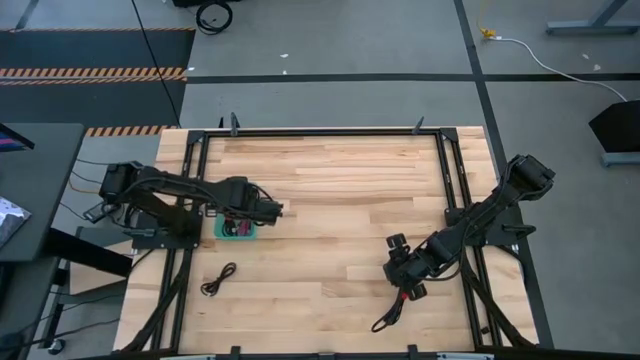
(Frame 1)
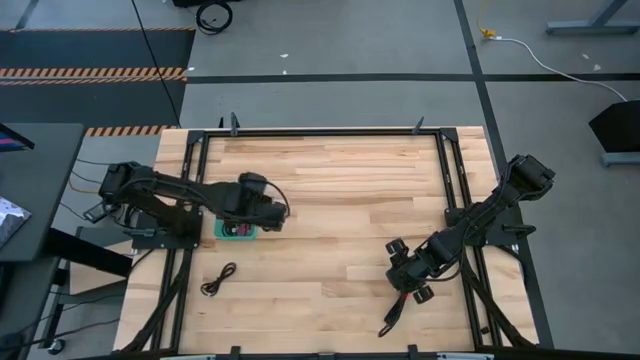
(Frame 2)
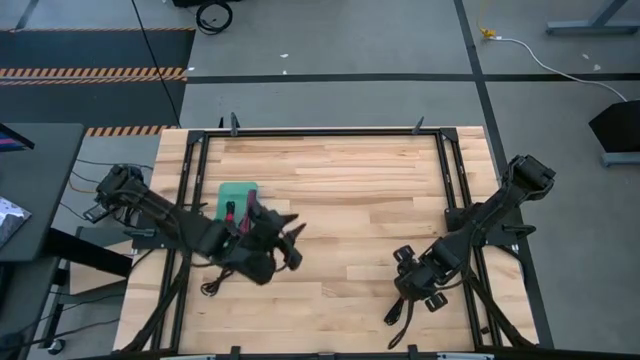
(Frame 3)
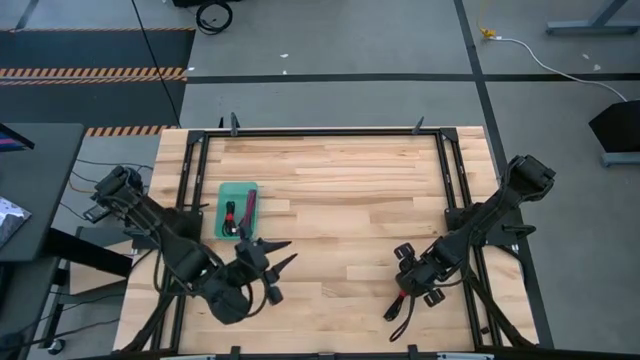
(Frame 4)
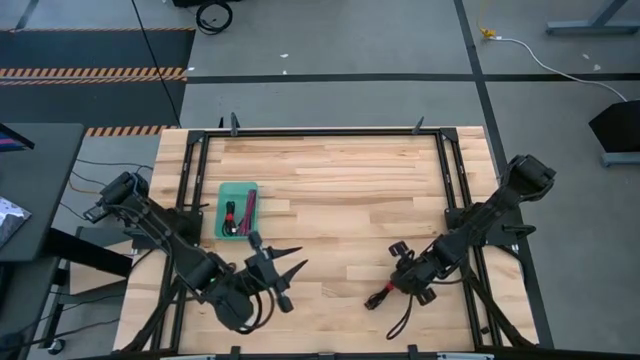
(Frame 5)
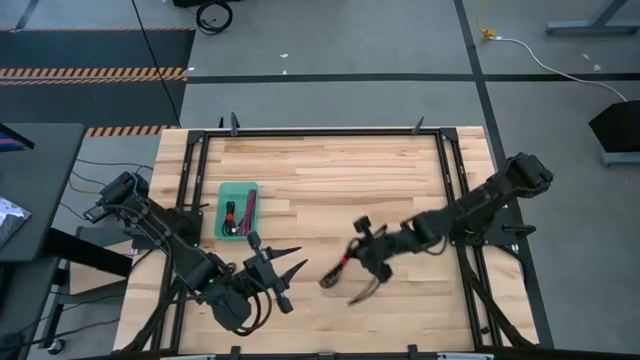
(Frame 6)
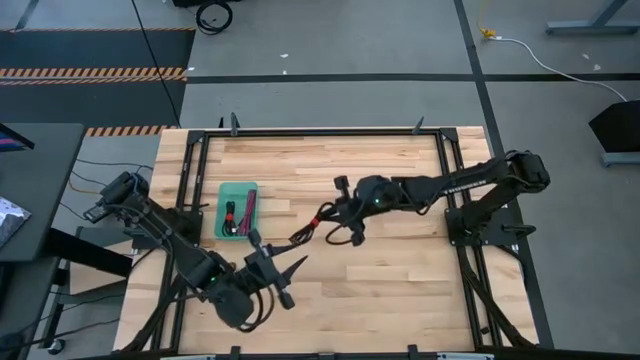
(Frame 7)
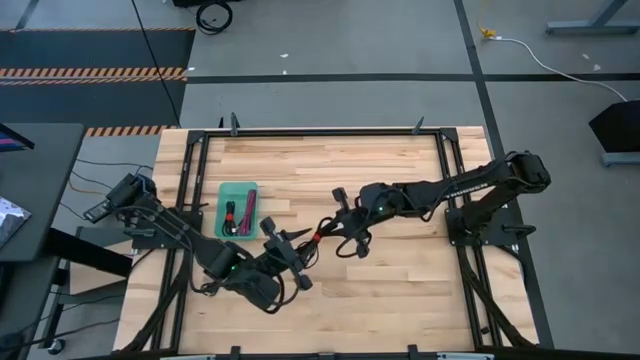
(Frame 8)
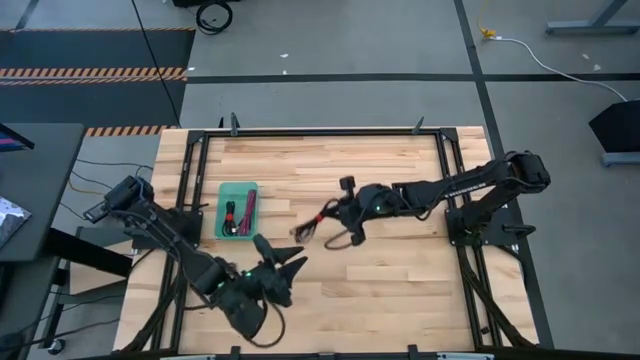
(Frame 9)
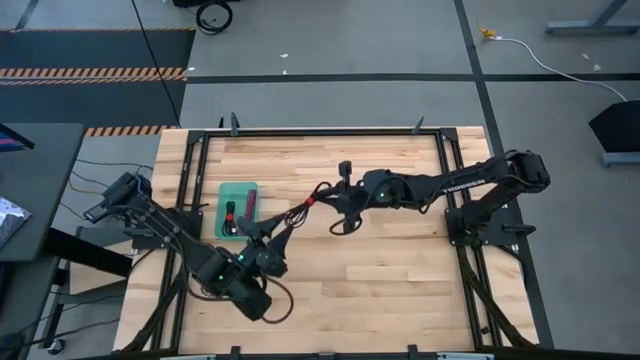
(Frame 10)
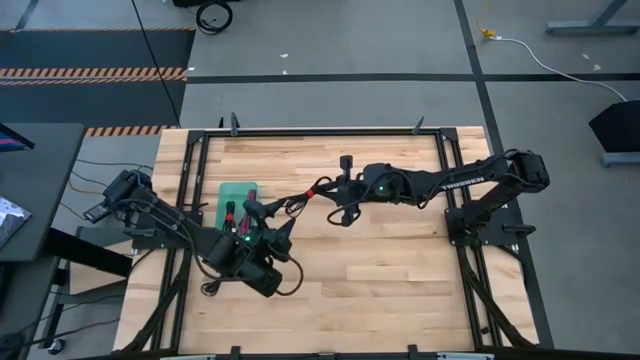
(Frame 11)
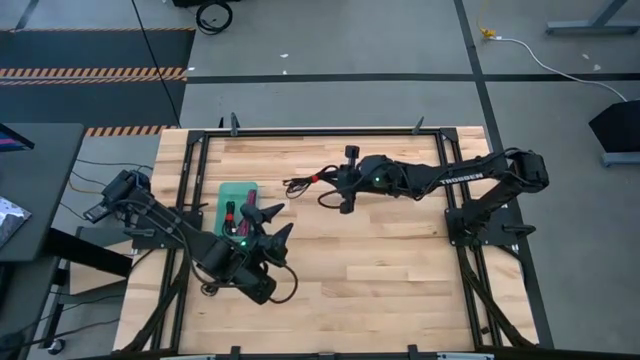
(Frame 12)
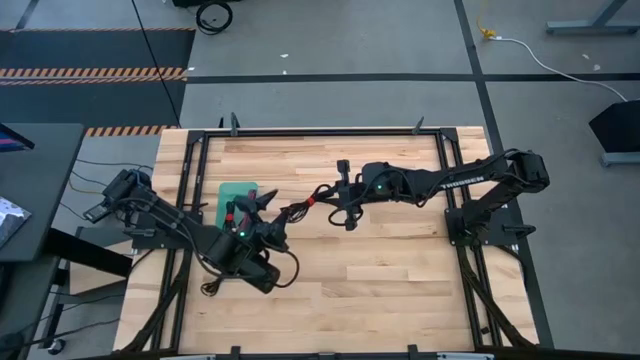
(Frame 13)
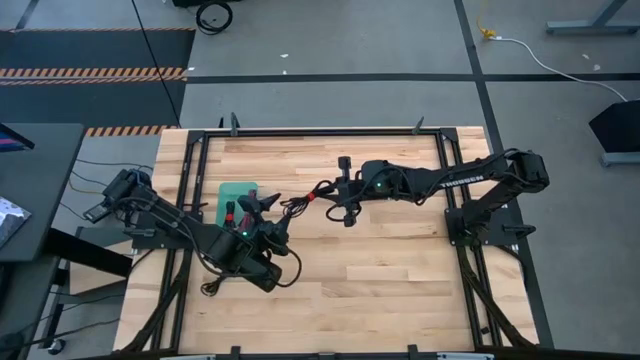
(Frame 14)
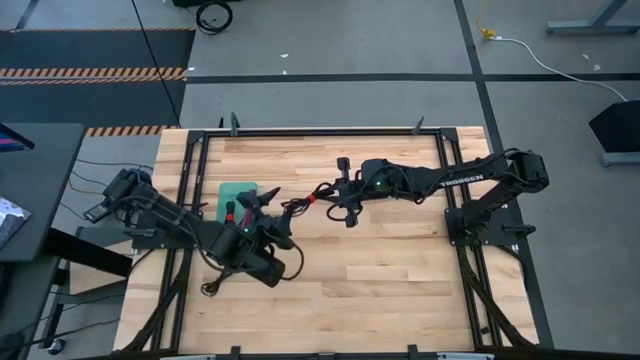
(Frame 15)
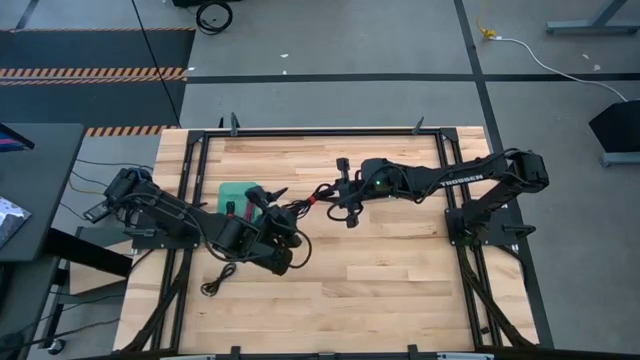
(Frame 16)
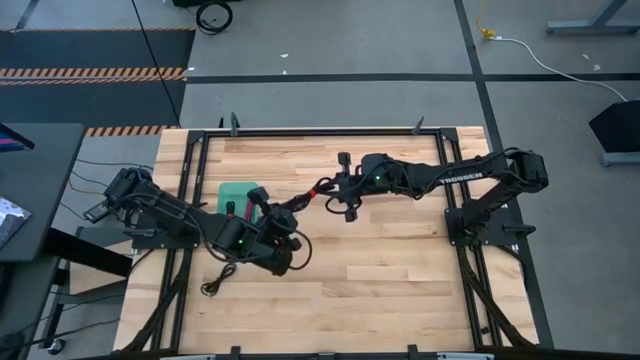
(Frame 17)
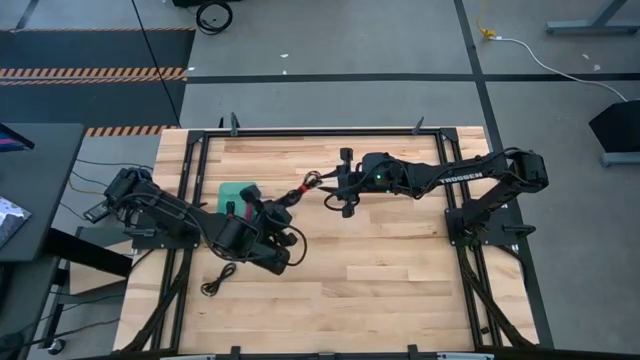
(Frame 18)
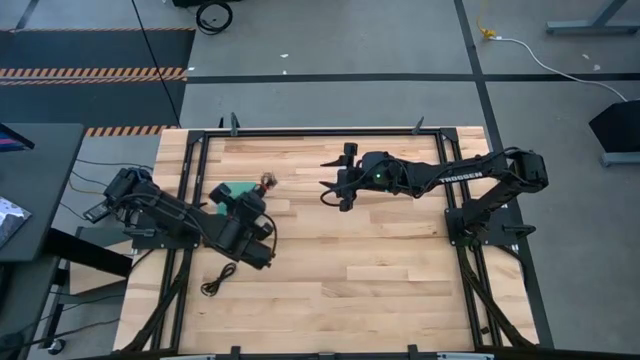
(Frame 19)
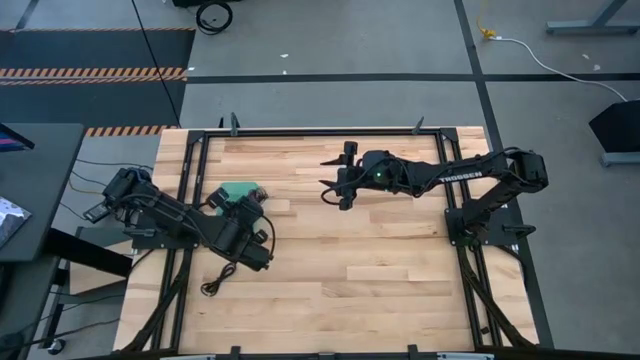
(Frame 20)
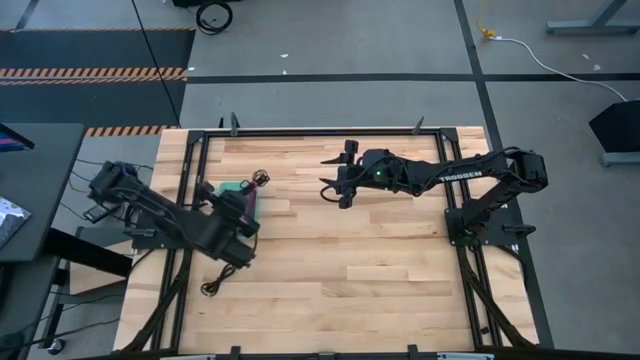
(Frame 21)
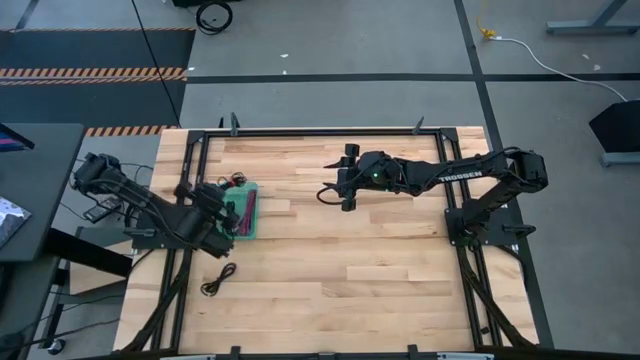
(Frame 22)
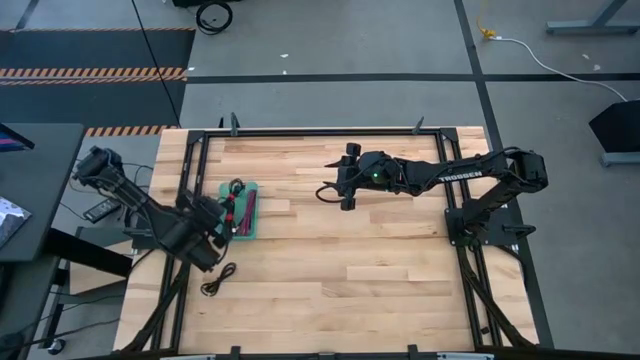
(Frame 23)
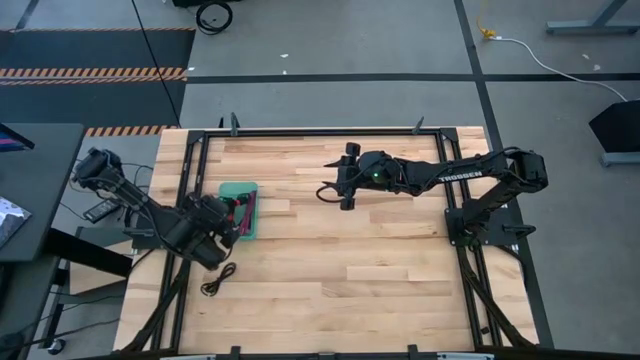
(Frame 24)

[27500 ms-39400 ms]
Task: Pick and place USB-C Cables
Put the black USB cable into the green bin

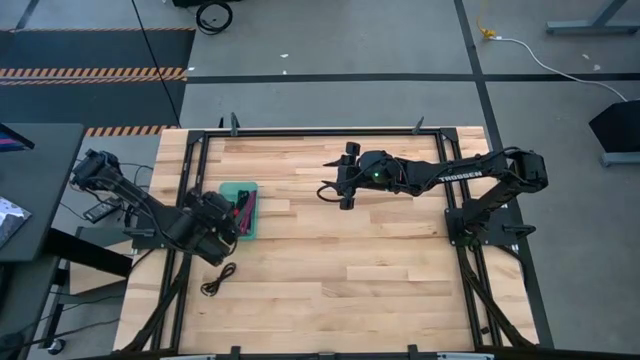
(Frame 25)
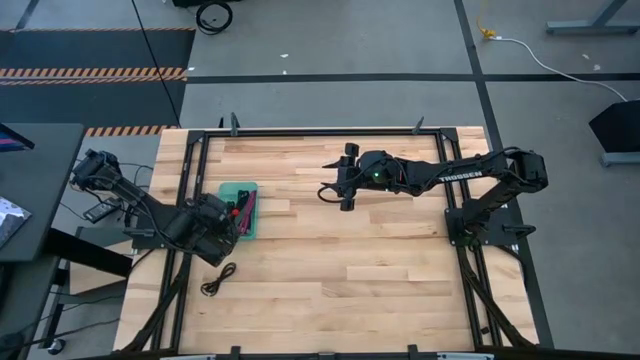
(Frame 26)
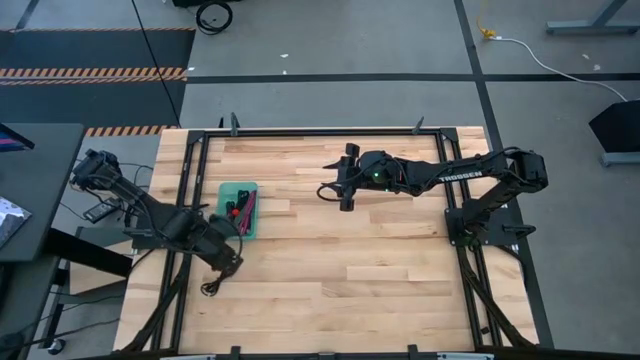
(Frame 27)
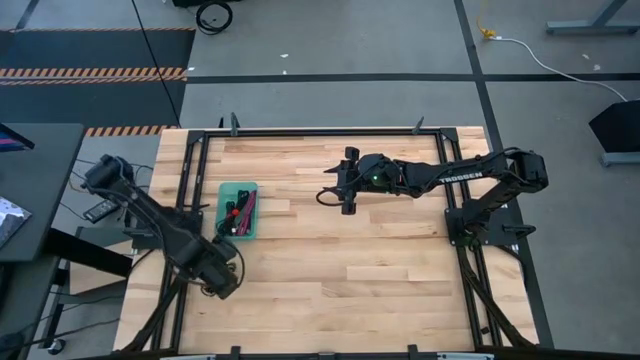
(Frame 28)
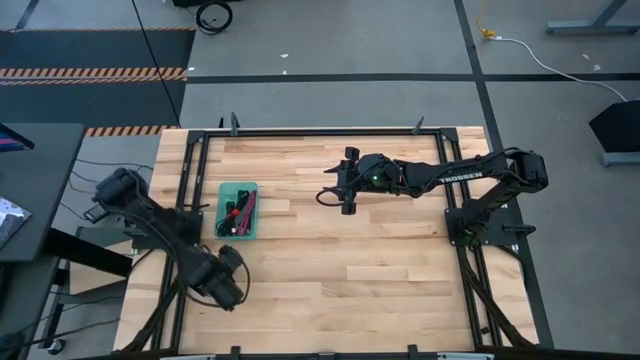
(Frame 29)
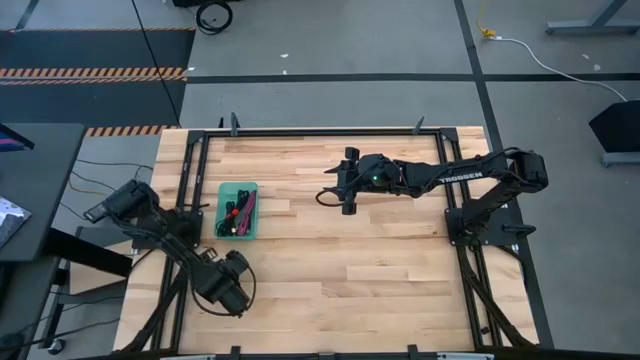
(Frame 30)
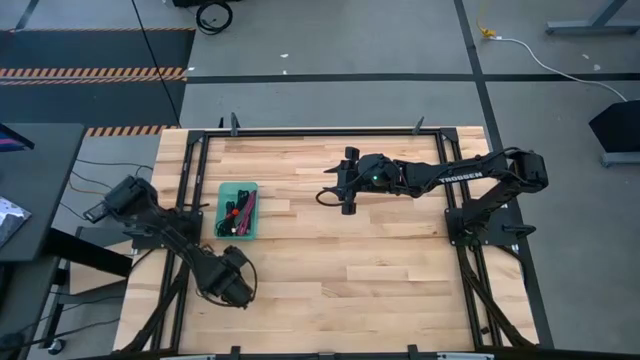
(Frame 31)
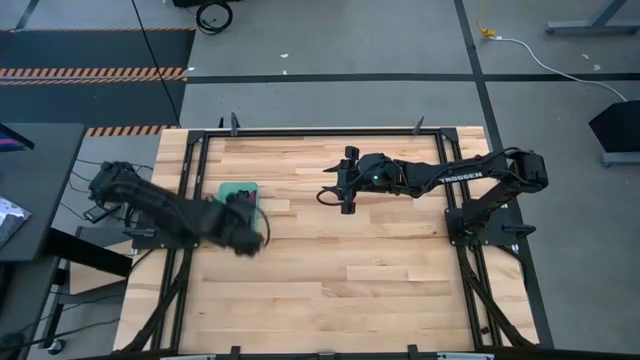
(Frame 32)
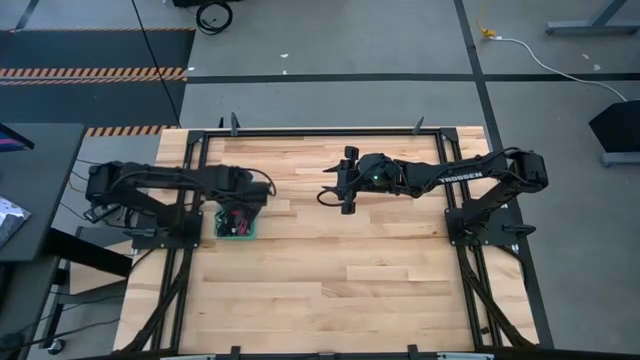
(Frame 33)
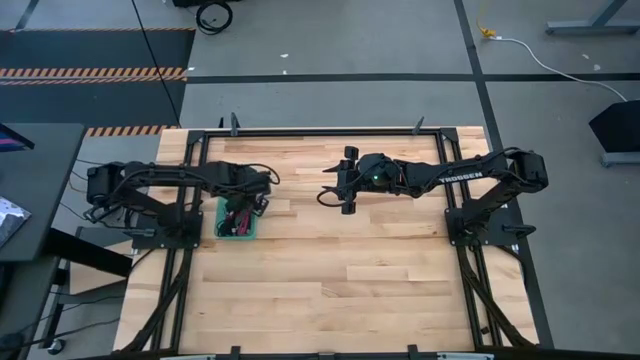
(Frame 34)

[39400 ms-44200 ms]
Put the black USB cable into the green bin

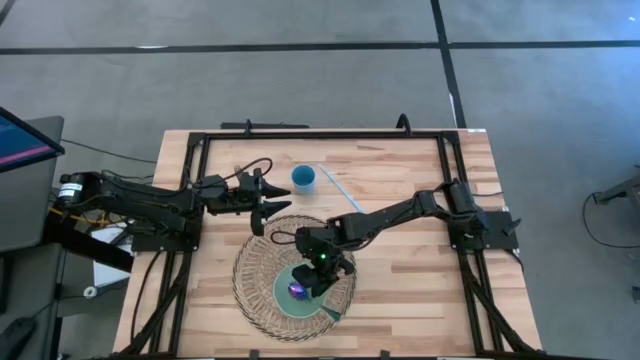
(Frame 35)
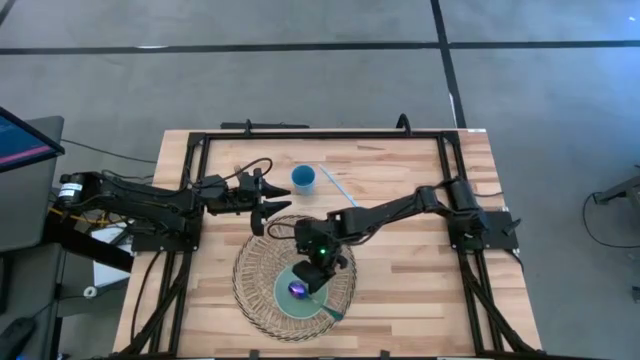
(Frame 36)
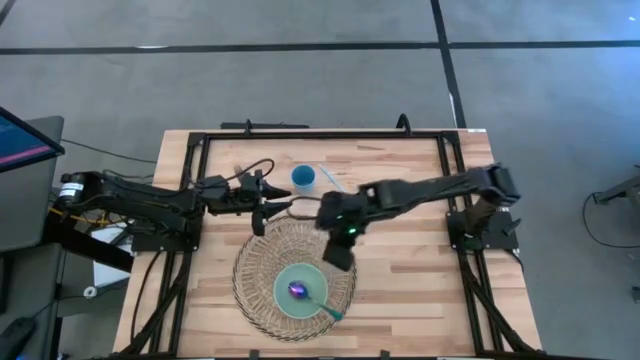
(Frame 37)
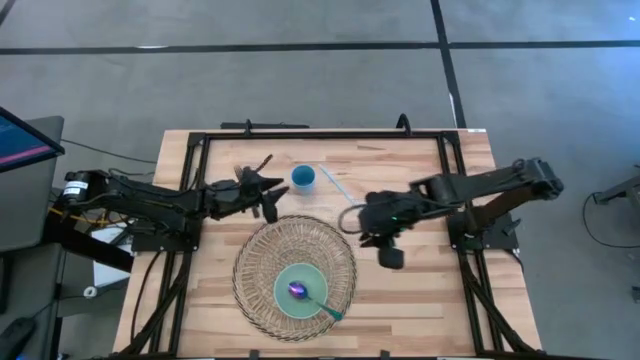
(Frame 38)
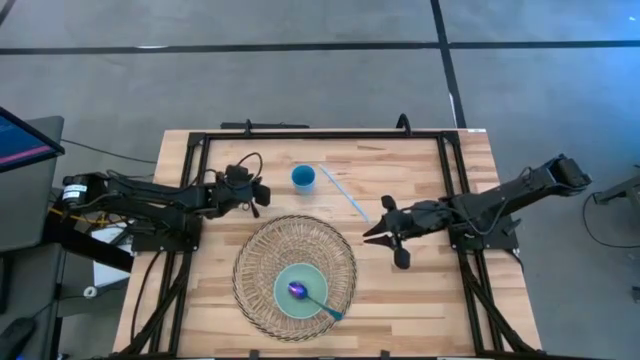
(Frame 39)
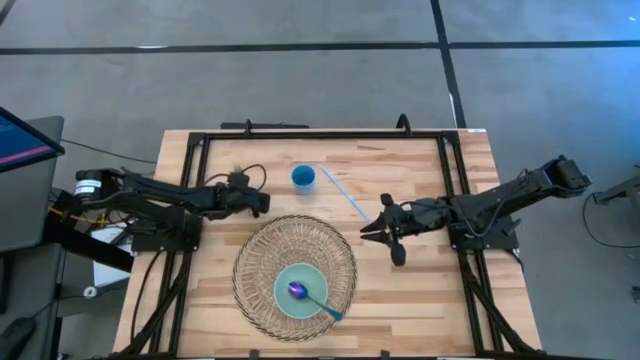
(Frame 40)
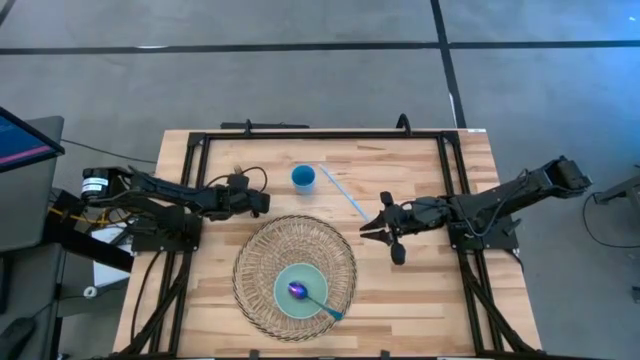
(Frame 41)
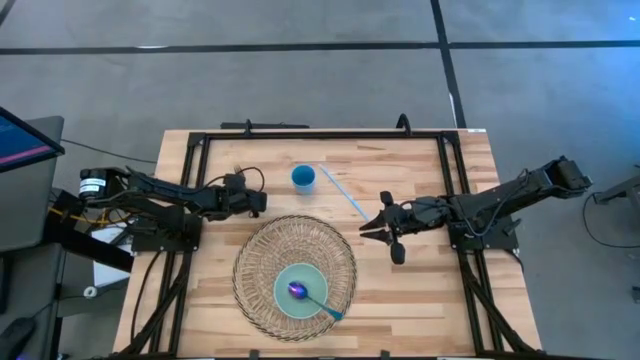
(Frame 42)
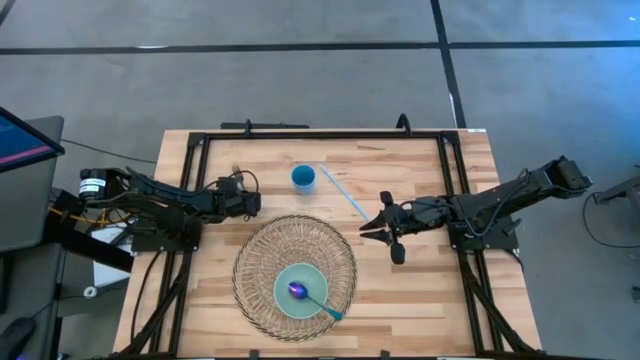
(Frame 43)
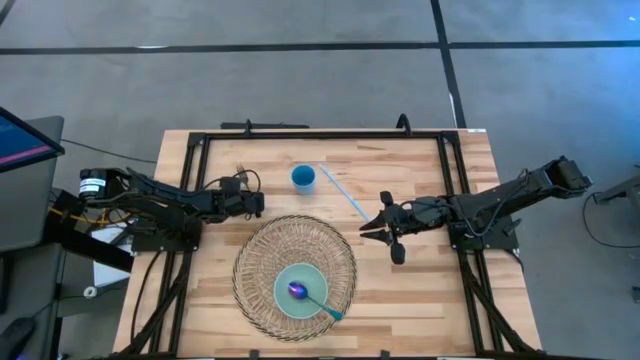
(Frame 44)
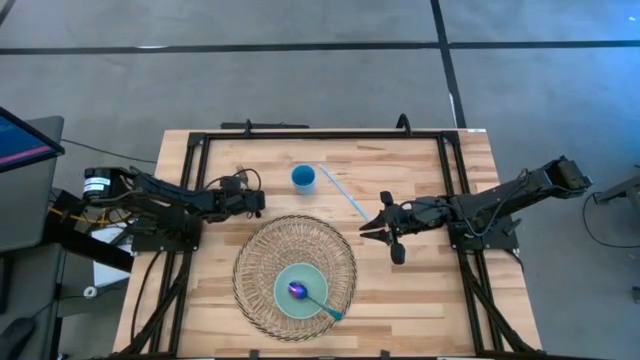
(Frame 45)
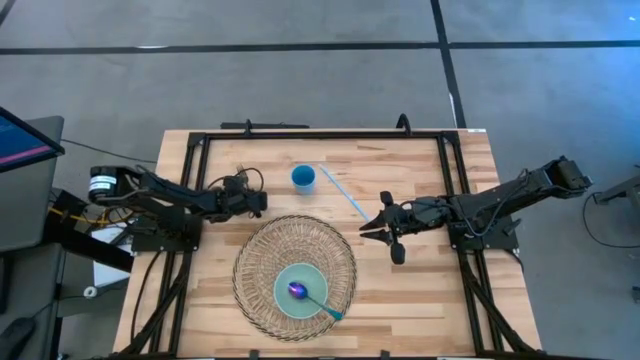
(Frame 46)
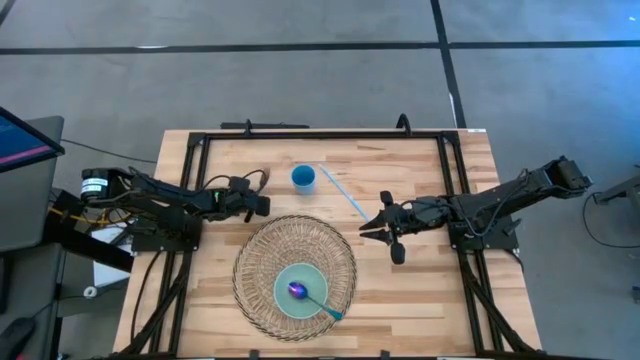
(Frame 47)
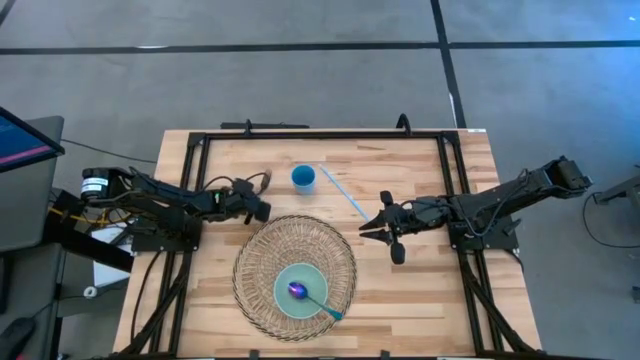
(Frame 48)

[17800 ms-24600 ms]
Task: Pick & Place Utensil
Put the black fork into the green bowl on the woven placemat
